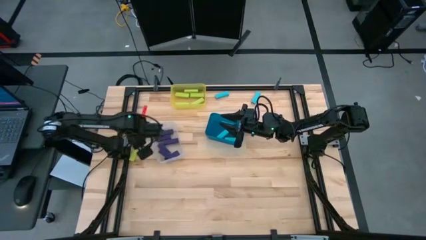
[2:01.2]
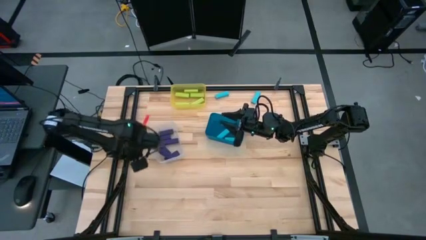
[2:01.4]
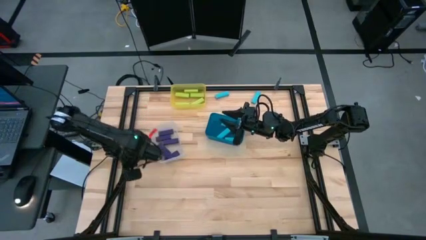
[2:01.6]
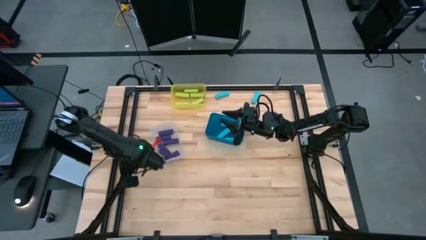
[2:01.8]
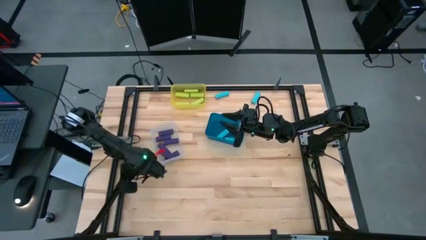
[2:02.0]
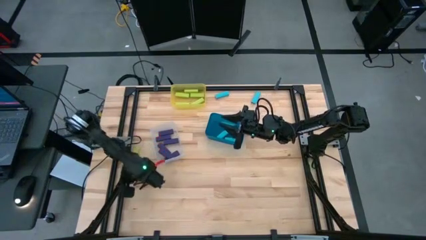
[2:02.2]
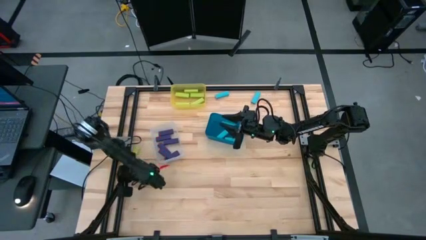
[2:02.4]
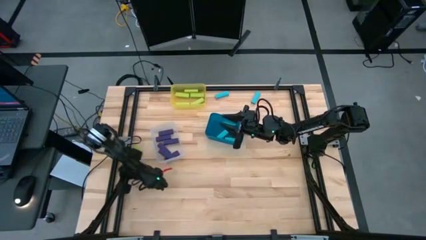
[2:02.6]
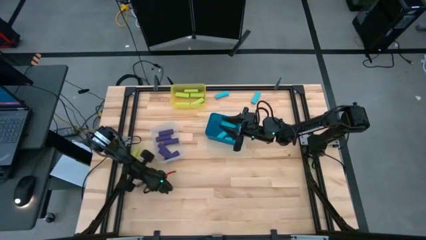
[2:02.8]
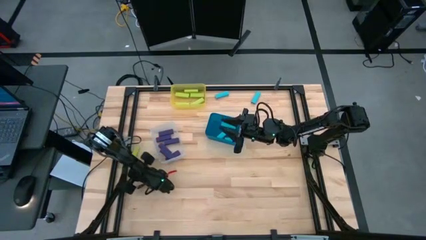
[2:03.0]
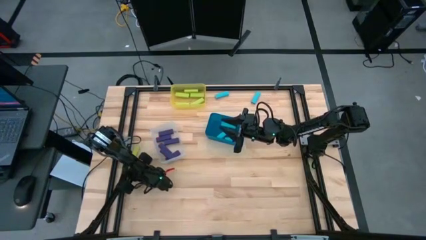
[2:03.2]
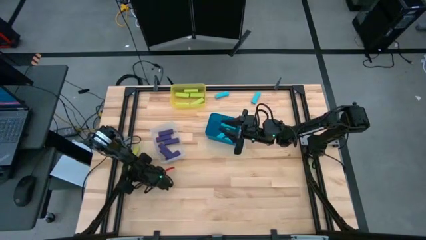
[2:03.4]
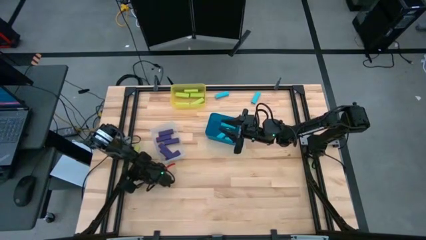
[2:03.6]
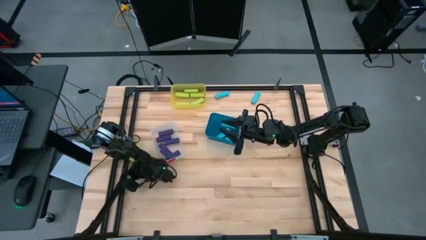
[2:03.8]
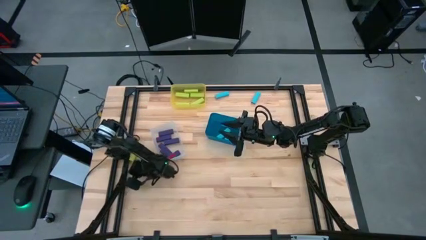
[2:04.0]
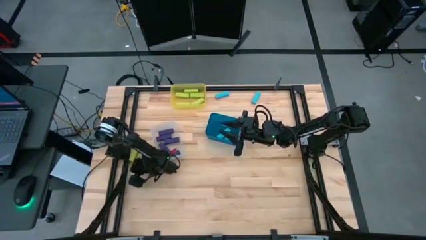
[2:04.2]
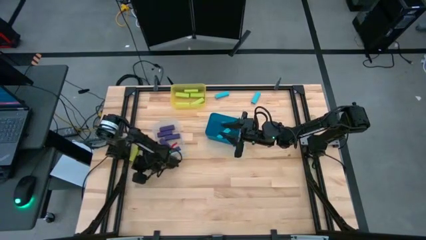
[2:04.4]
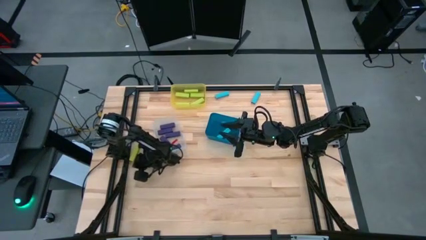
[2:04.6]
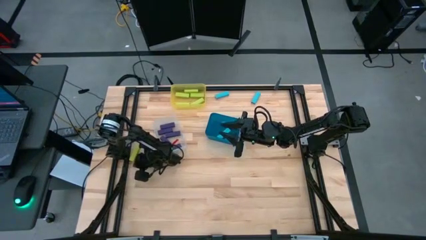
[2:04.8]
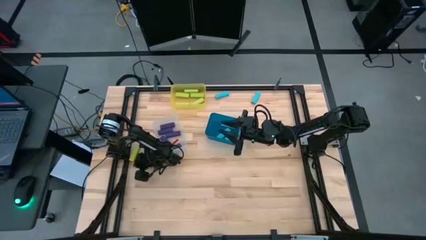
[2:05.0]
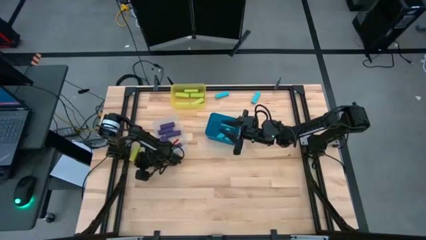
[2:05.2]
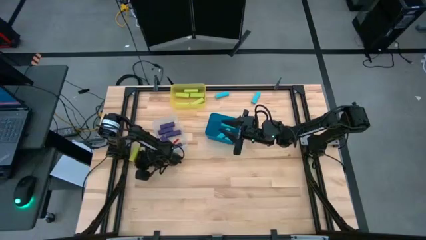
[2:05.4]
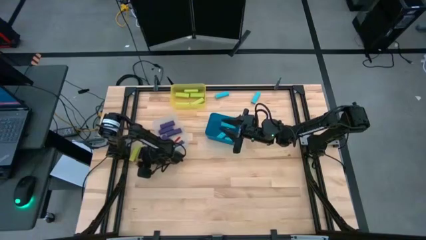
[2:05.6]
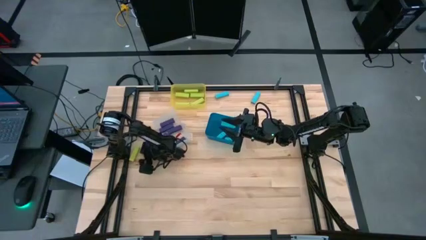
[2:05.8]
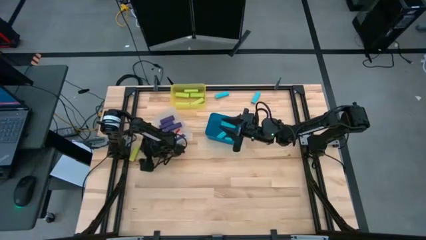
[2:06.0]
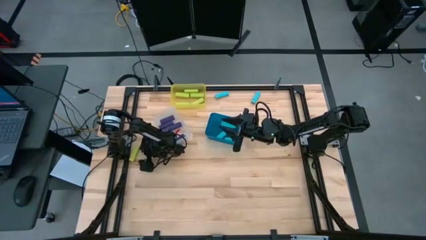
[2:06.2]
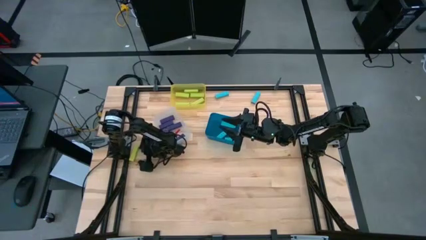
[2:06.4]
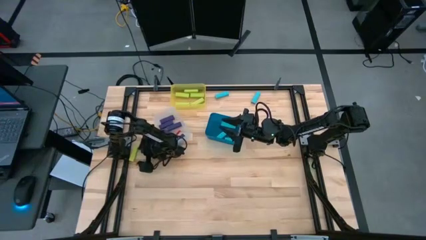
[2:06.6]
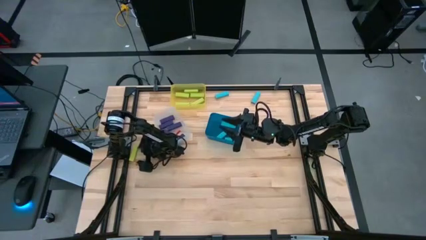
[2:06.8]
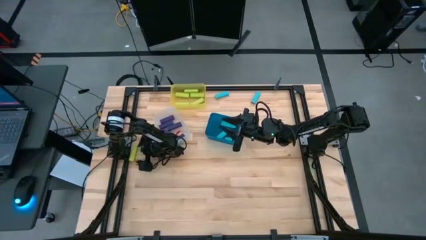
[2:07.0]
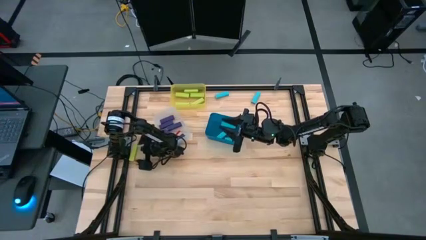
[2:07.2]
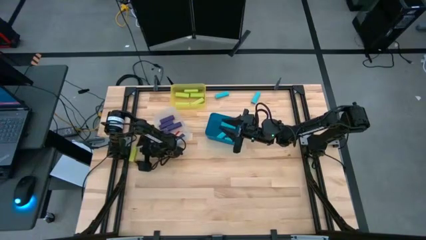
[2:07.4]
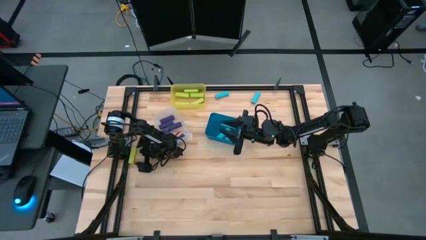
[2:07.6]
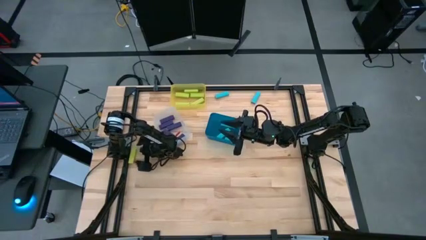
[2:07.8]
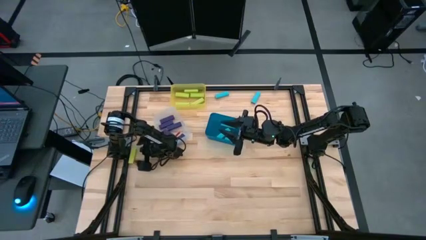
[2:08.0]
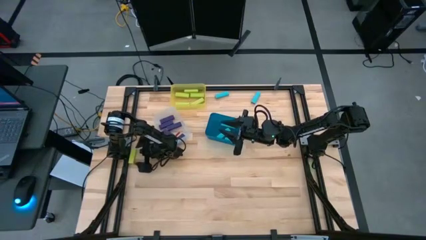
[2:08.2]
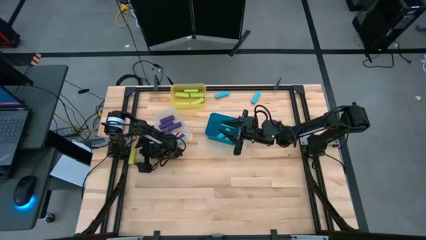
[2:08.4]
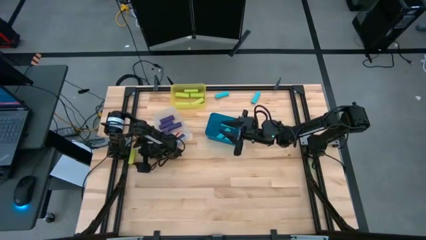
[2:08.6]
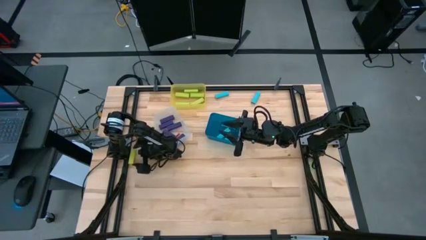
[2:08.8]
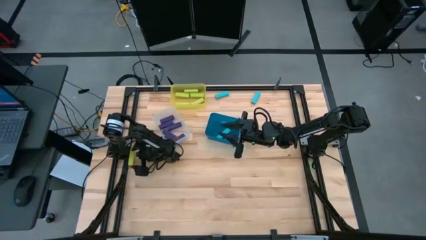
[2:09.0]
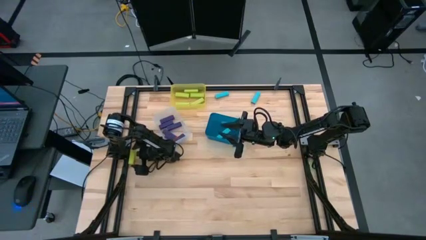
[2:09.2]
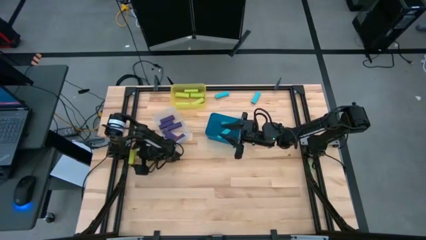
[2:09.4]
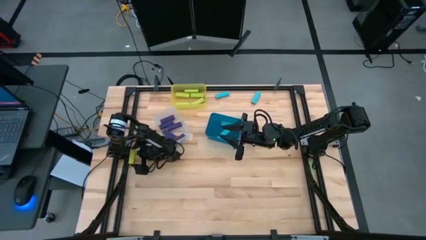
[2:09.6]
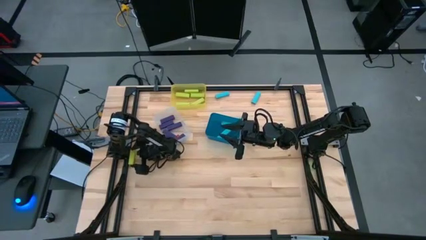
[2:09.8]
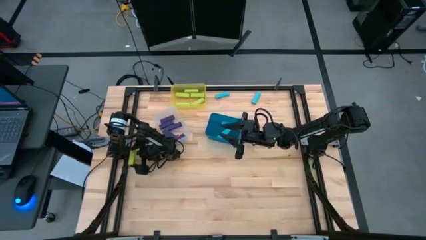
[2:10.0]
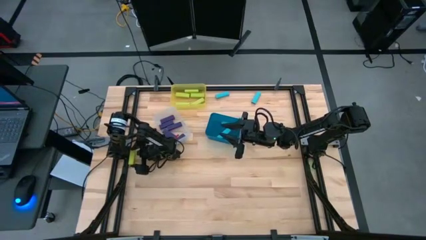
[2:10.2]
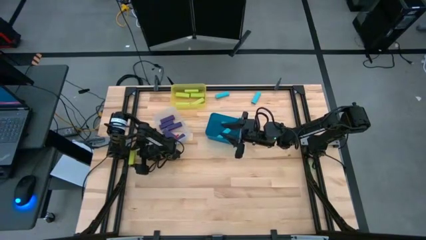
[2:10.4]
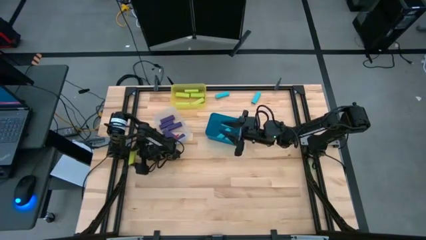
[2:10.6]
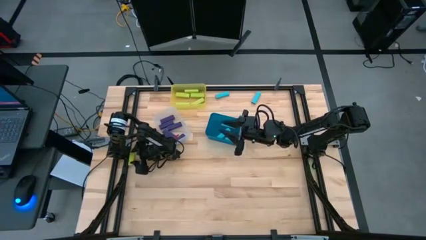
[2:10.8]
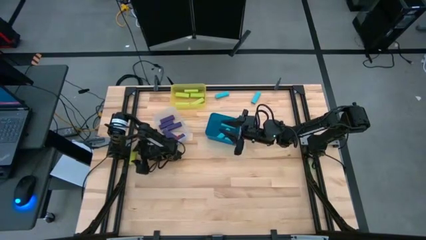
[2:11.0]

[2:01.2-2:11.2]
Task: Sort blocks
Put the green block into the yellow bin

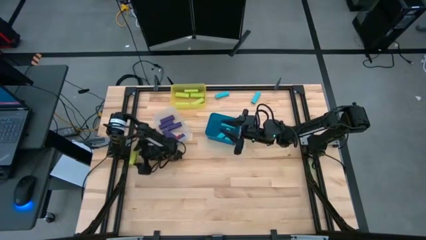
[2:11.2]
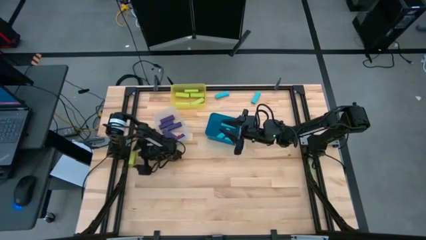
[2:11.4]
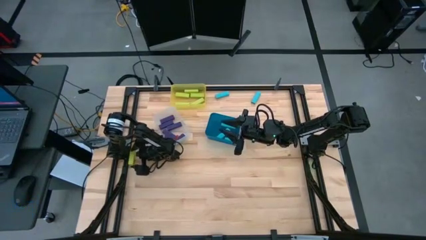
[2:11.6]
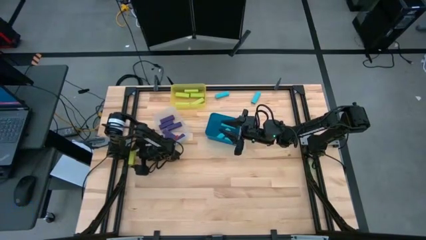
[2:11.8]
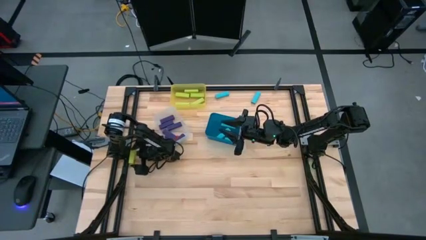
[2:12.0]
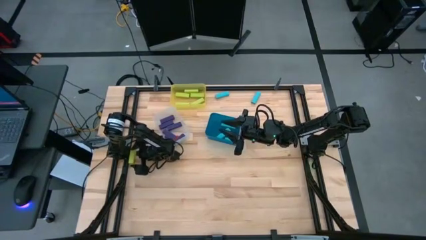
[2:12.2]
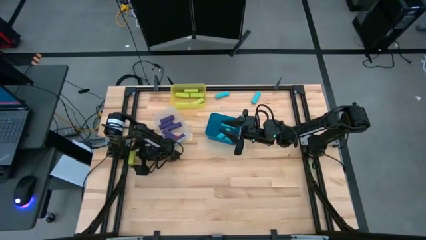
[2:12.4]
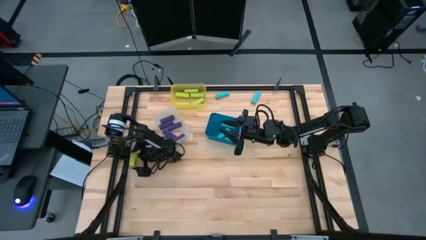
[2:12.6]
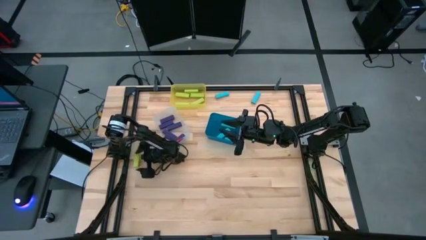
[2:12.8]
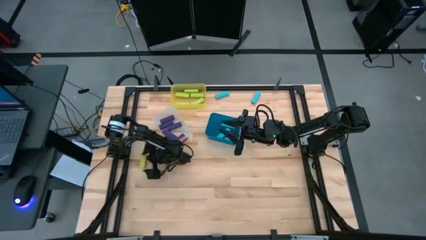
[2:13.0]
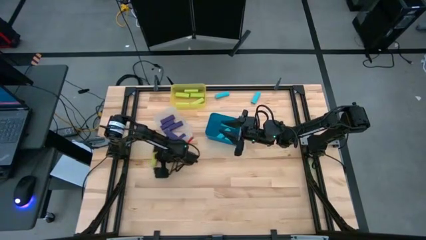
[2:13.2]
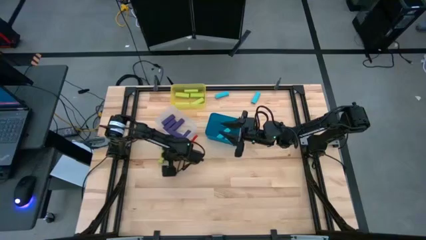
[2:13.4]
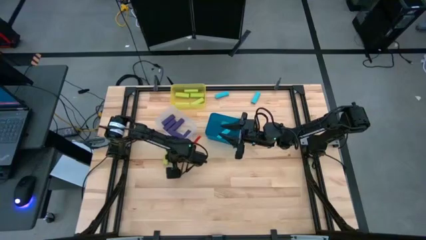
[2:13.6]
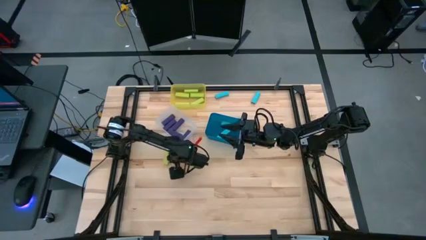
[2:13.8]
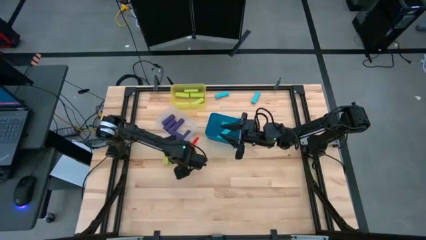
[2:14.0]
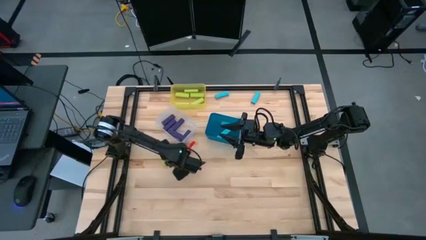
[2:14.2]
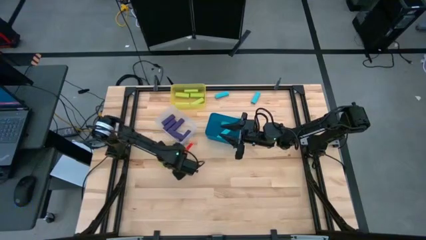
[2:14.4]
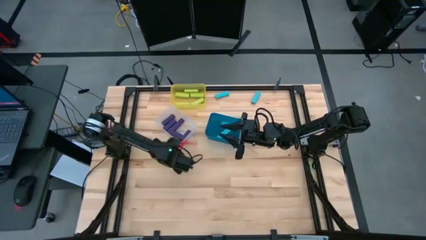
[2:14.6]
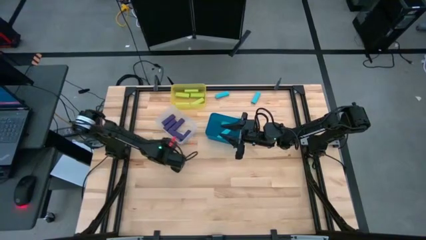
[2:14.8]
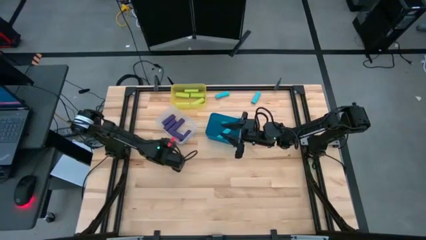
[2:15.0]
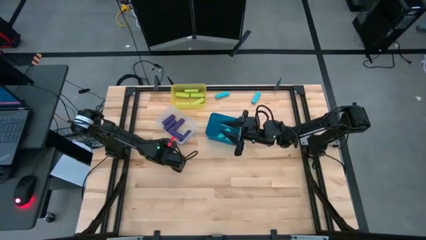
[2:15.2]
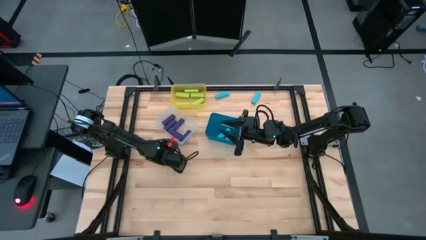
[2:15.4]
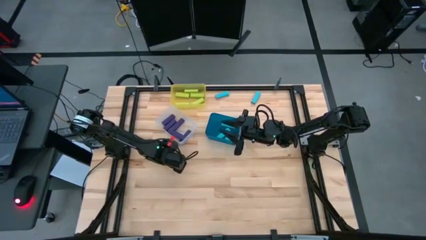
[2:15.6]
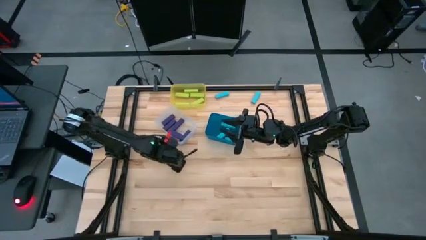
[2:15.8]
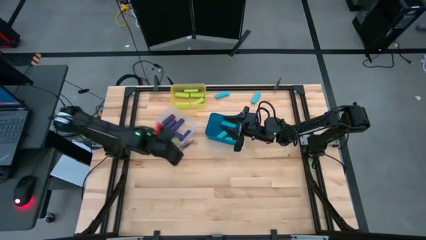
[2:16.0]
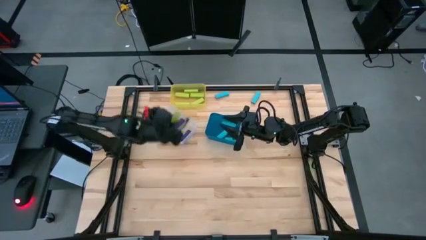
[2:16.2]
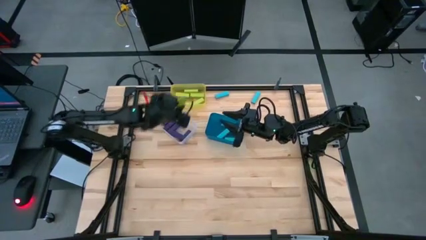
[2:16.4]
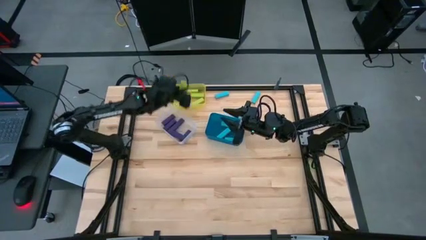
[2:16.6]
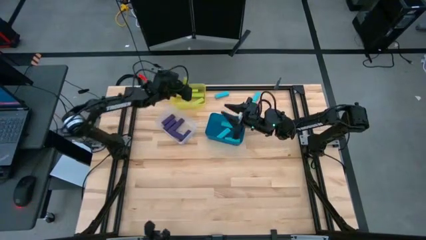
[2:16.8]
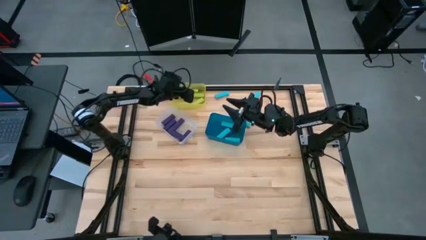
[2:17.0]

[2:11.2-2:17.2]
Put the green block into the yellow bin

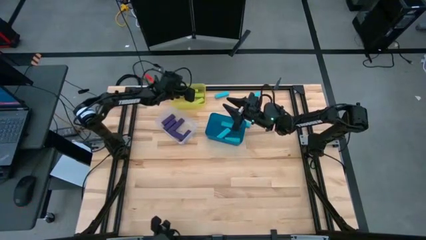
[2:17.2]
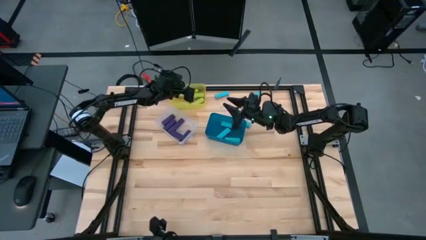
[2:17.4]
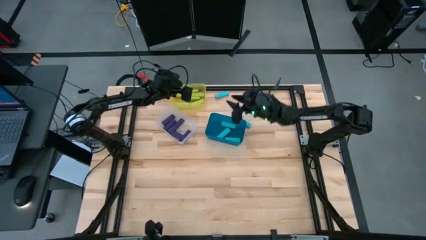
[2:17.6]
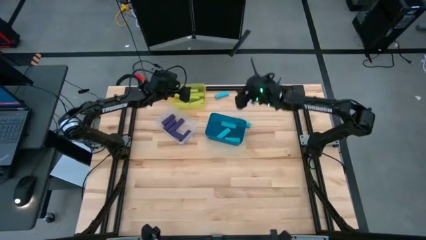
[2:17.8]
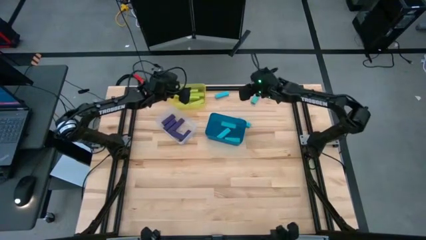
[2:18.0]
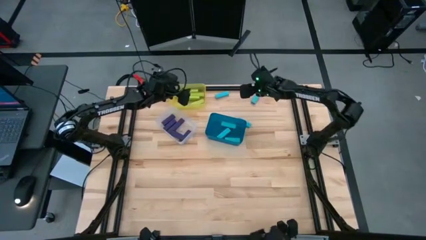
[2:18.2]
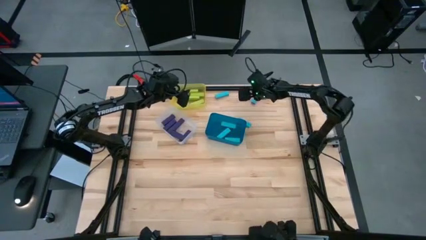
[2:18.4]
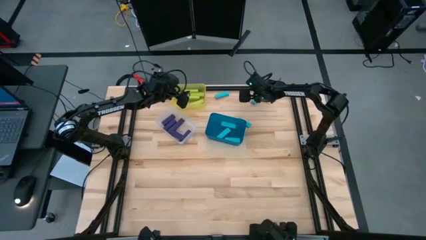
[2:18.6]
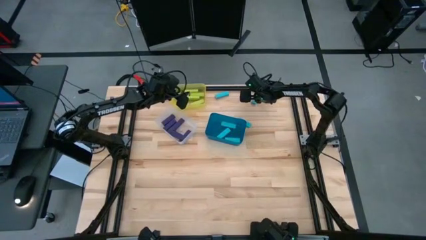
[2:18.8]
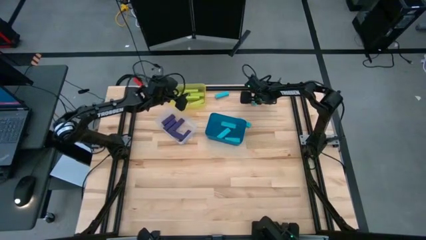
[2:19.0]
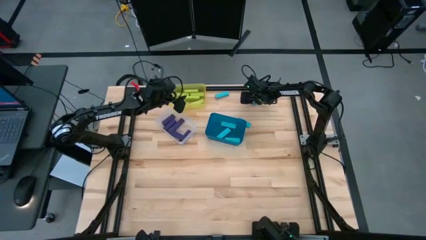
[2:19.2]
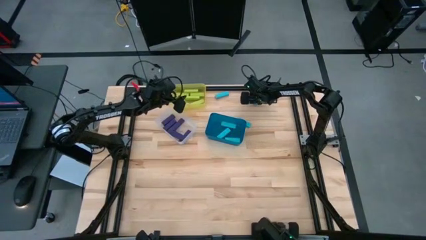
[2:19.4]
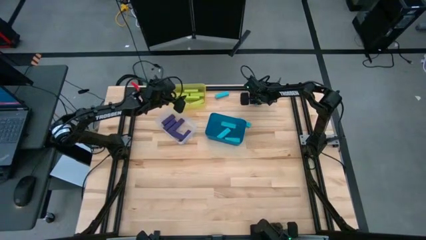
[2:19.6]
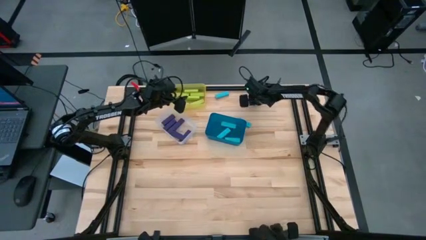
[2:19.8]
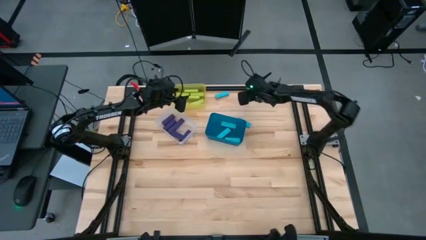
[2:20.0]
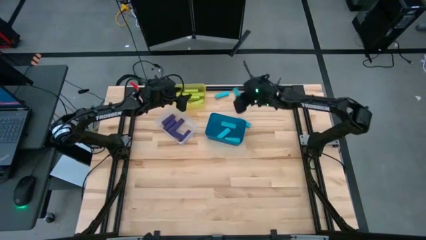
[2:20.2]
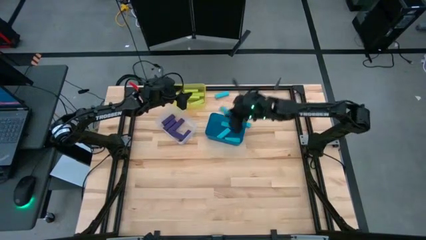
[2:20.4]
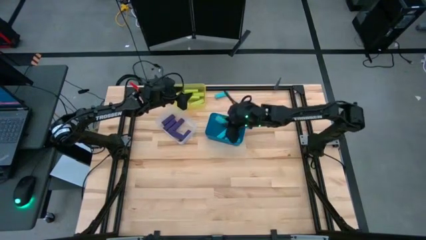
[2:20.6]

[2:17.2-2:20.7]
Put the blue block into the blue bin
